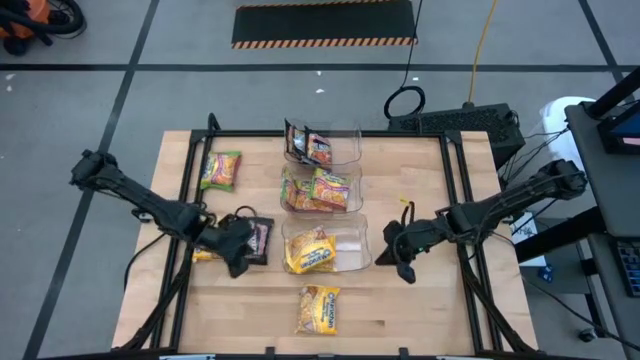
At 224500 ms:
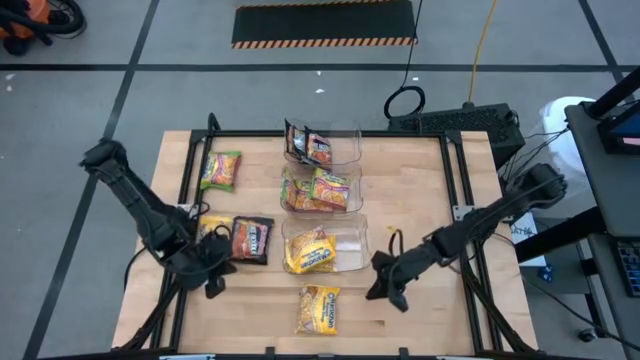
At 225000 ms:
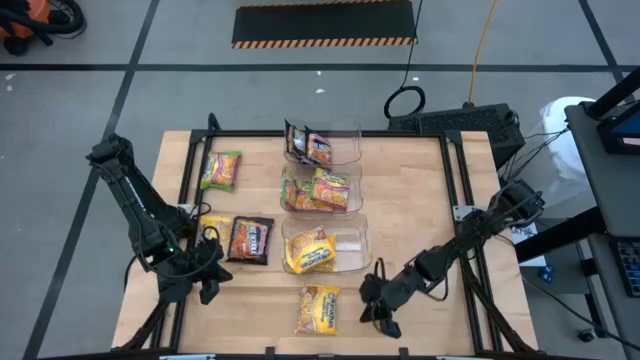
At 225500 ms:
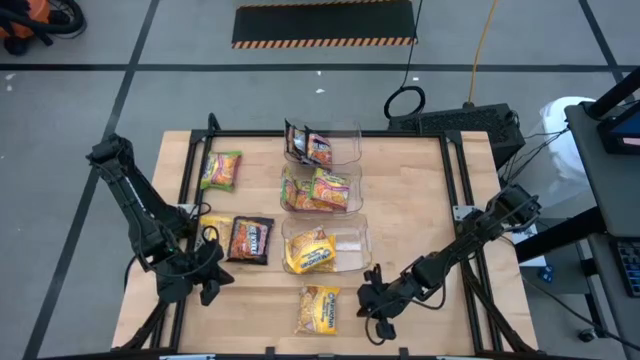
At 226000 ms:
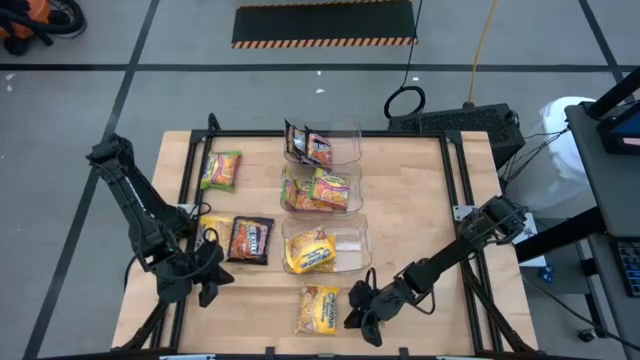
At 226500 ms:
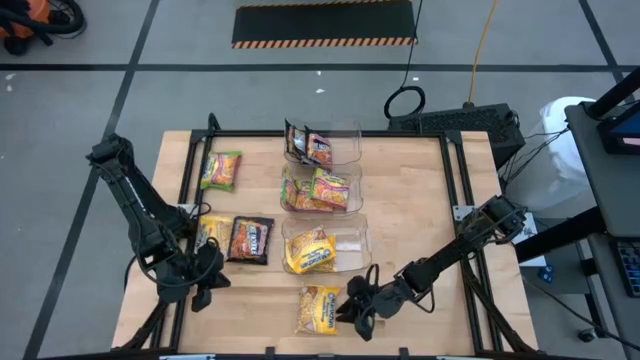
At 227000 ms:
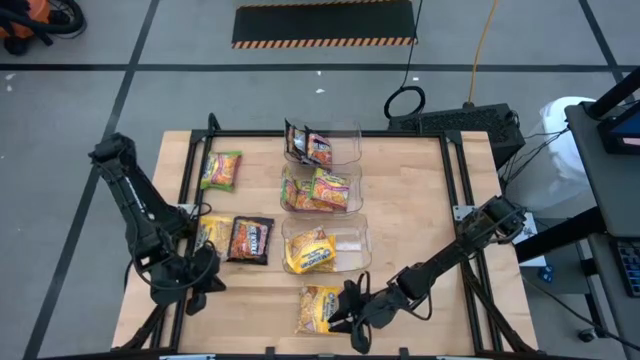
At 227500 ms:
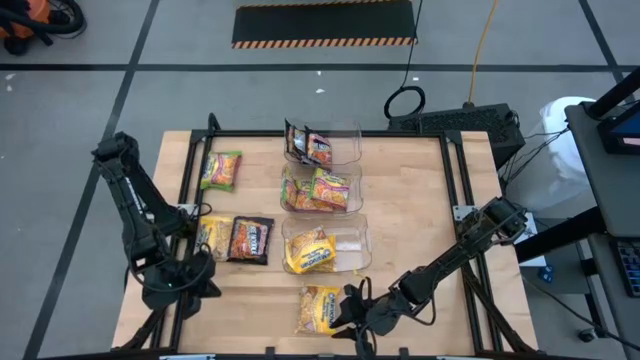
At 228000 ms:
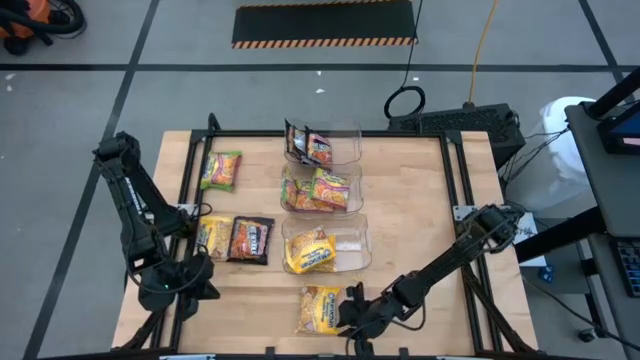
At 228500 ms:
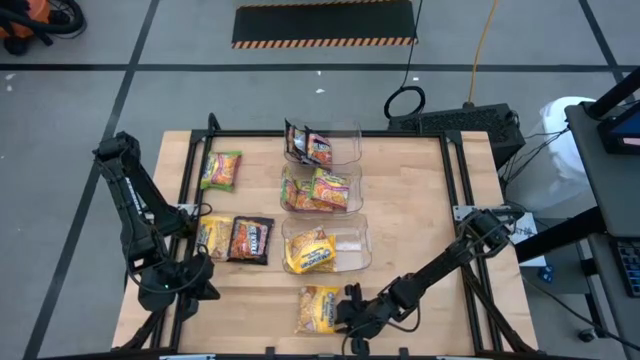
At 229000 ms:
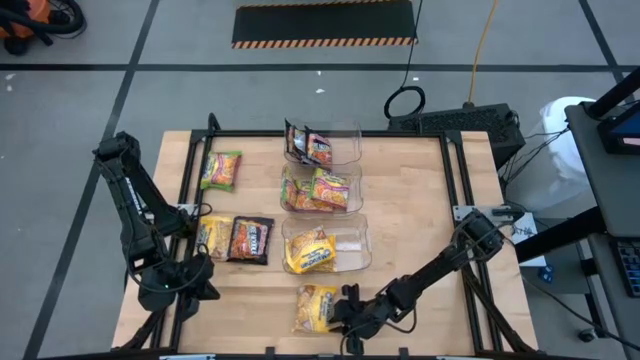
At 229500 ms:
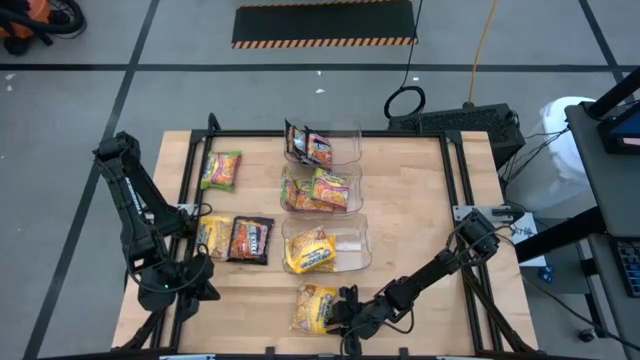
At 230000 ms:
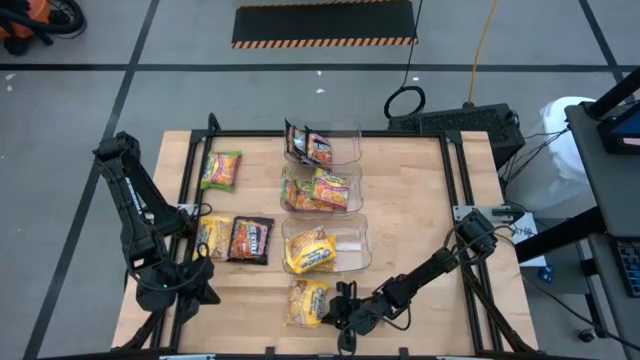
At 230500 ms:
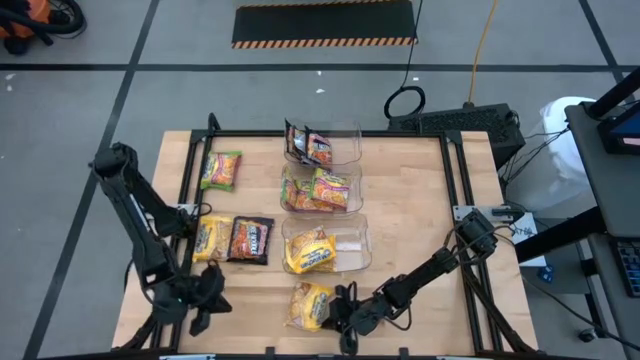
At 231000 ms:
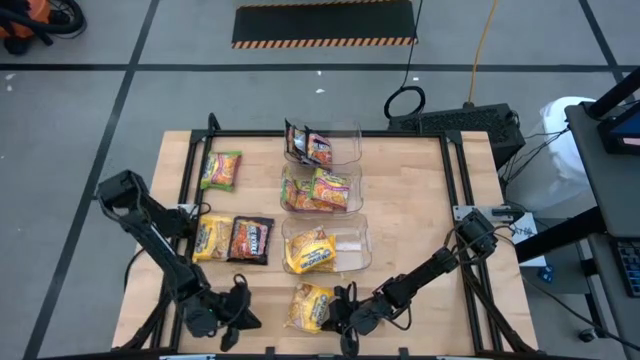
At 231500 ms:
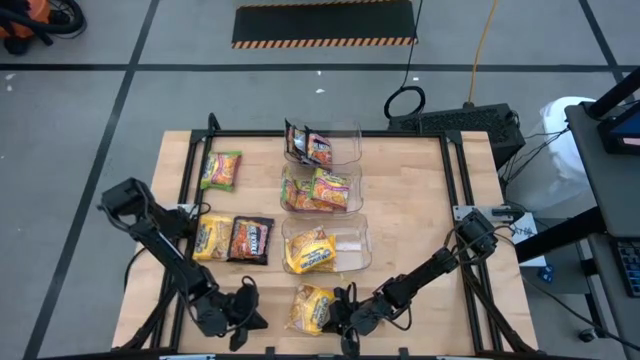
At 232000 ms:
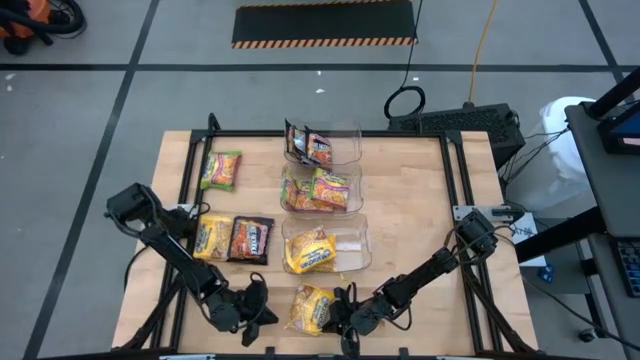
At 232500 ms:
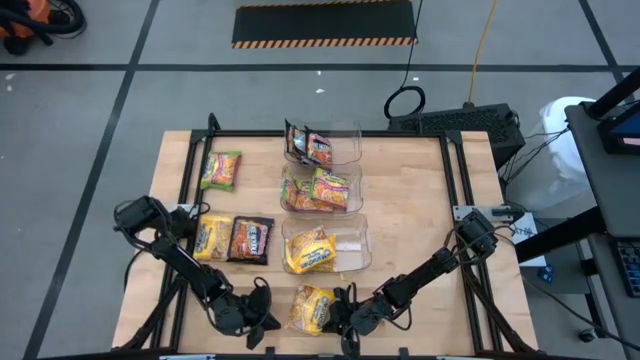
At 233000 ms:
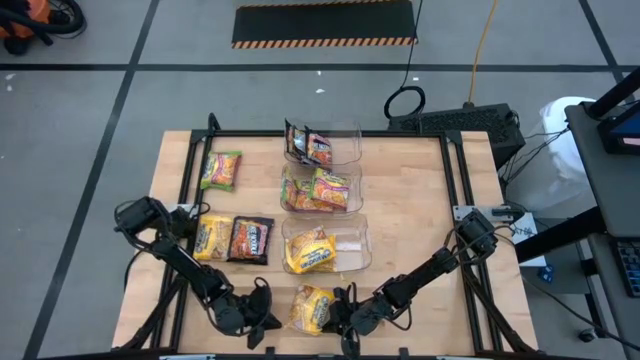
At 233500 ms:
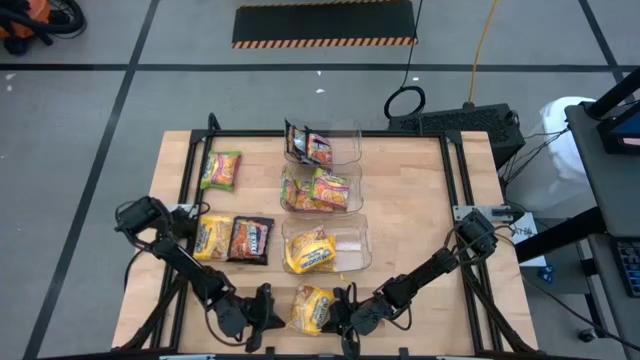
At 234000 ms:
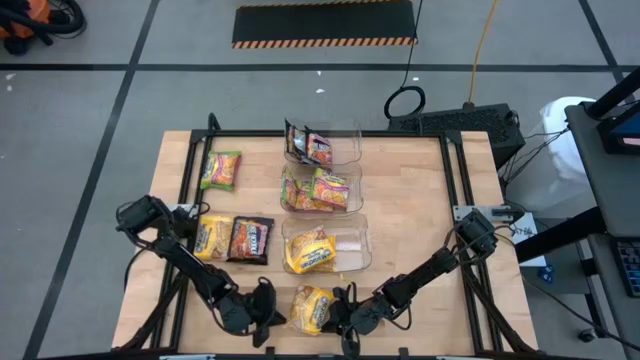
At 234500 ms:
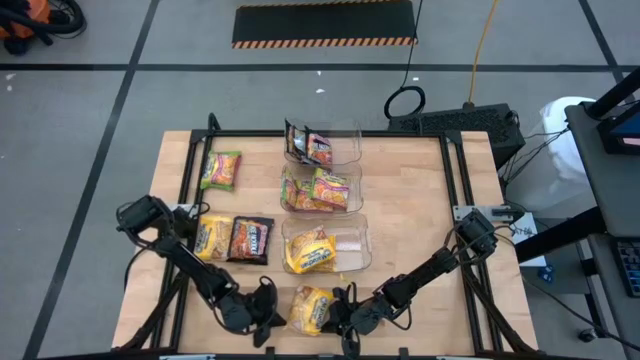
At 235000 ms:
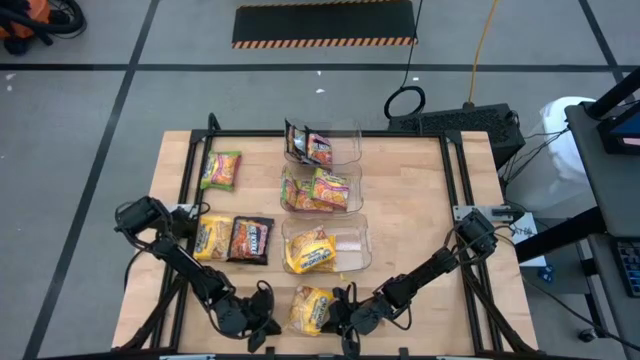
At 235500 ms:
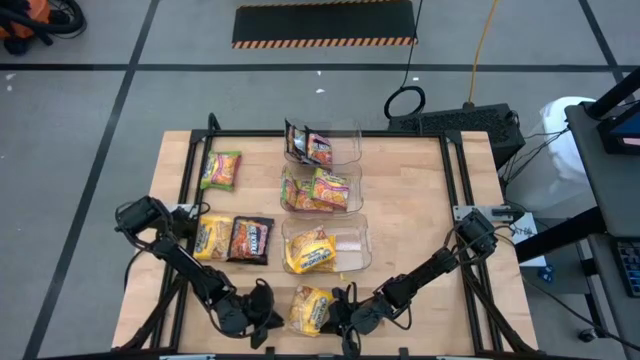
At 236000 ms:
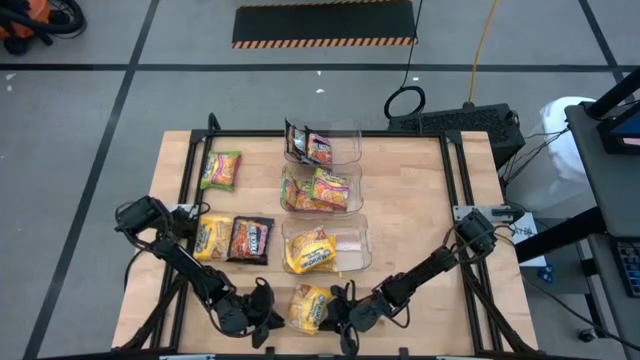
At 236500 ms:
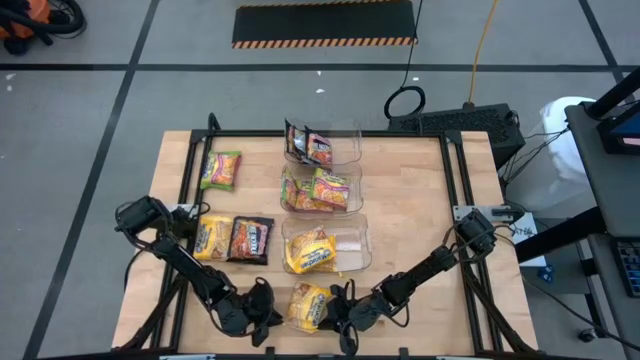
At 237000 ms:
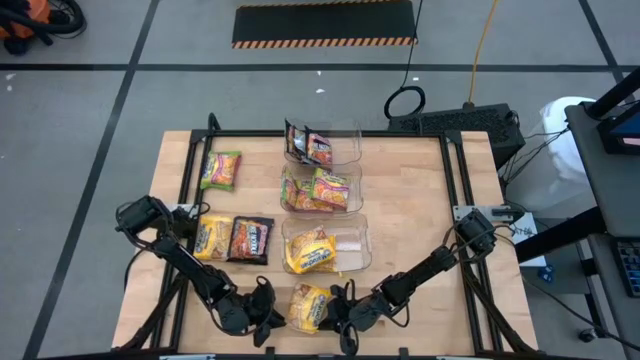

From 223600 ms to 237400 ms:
Task: Sort Maruchan noodles
Put the yellow noodle pack into the bottom transparent bin

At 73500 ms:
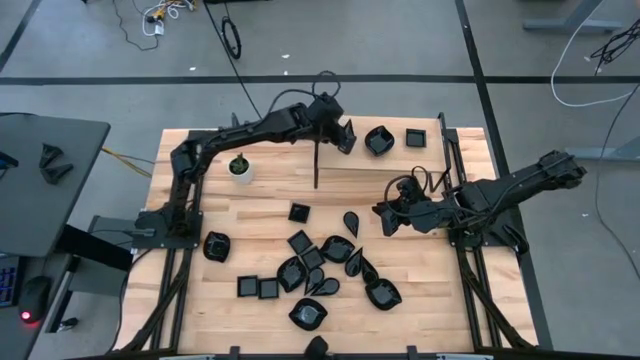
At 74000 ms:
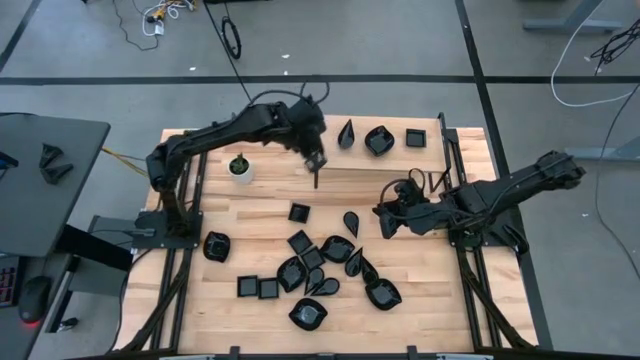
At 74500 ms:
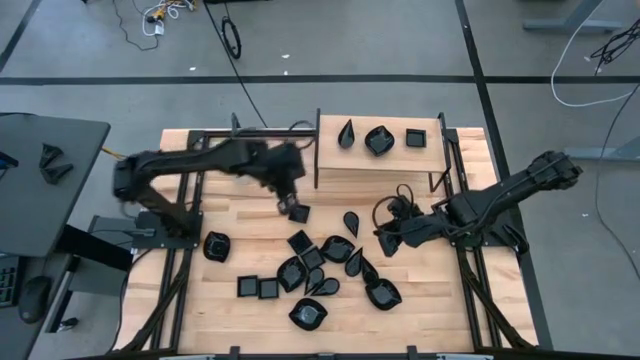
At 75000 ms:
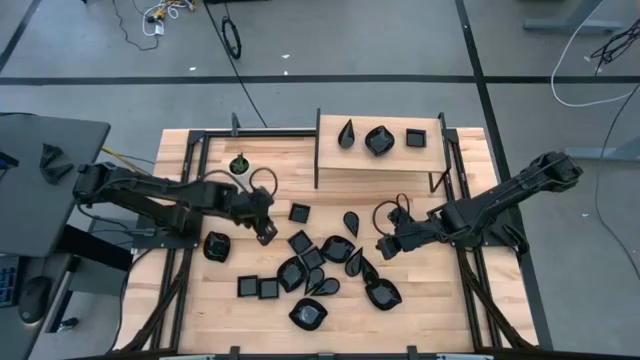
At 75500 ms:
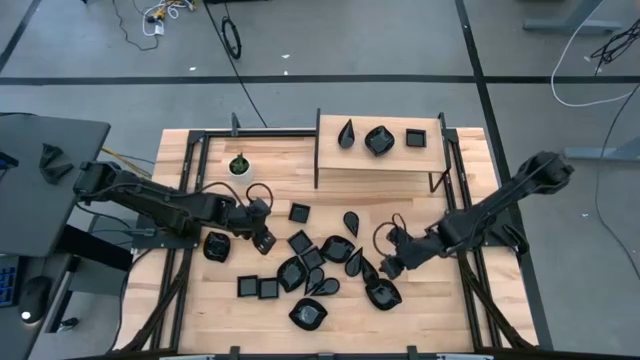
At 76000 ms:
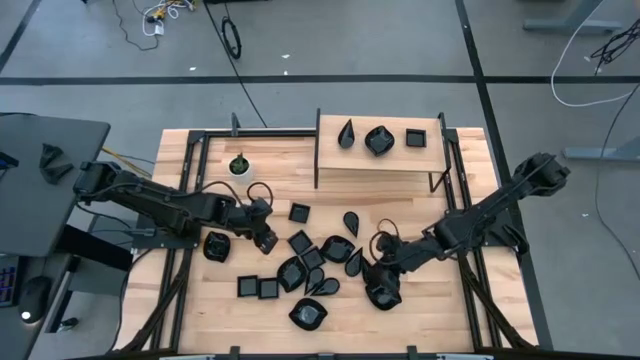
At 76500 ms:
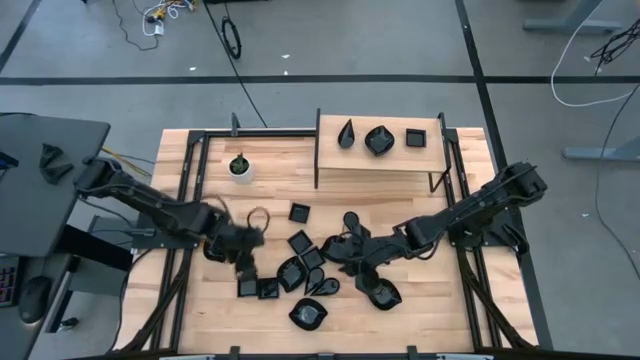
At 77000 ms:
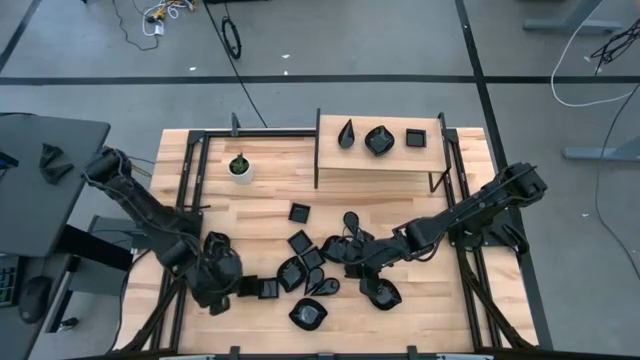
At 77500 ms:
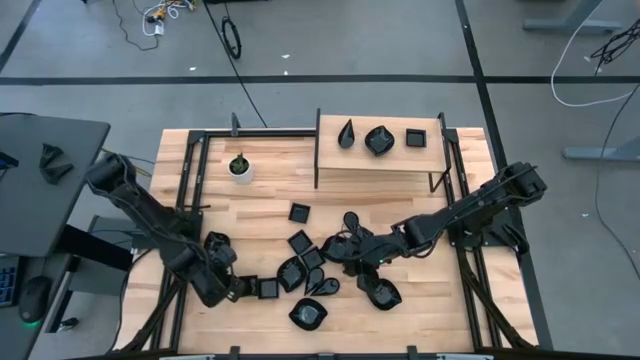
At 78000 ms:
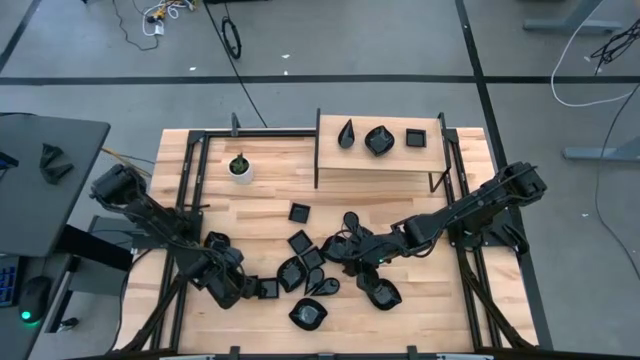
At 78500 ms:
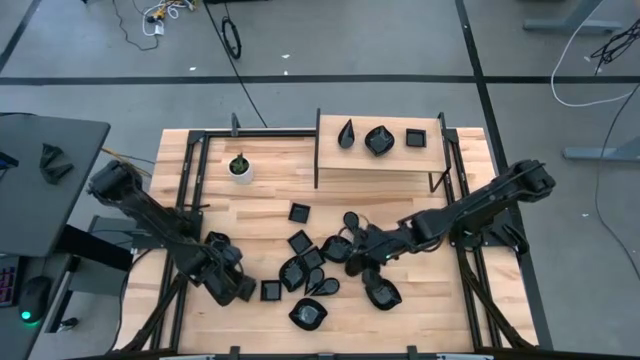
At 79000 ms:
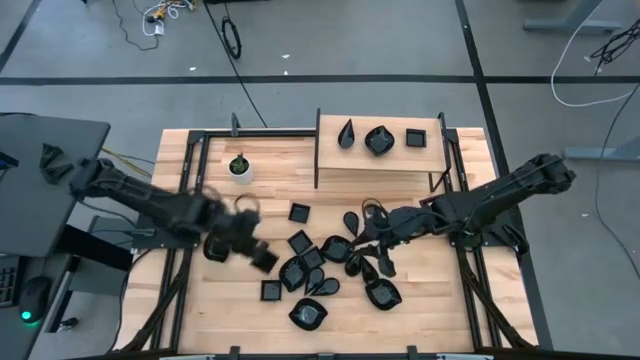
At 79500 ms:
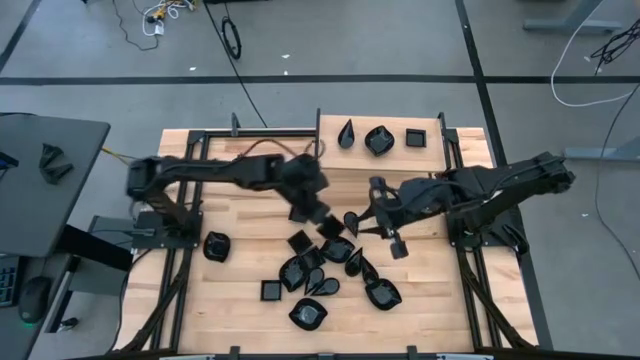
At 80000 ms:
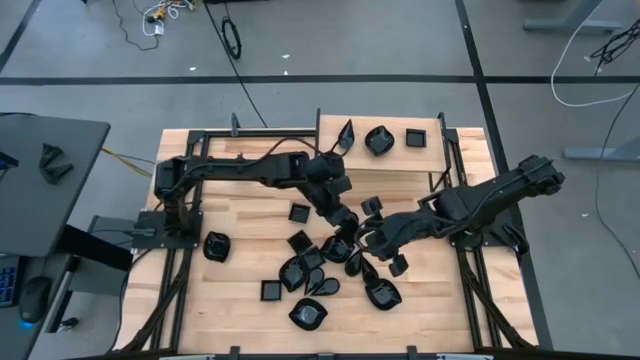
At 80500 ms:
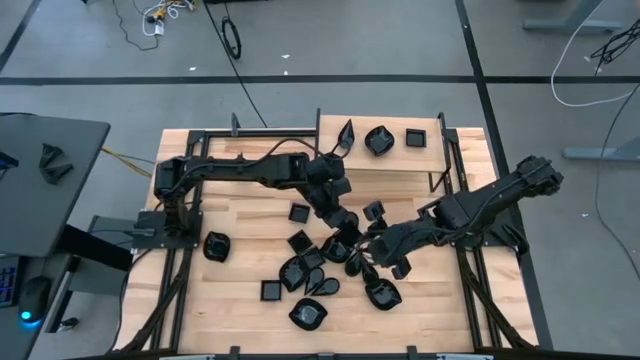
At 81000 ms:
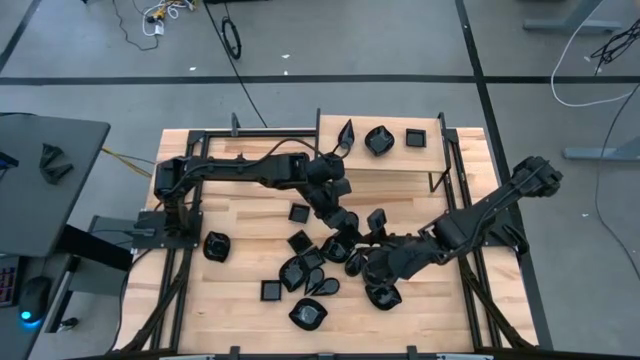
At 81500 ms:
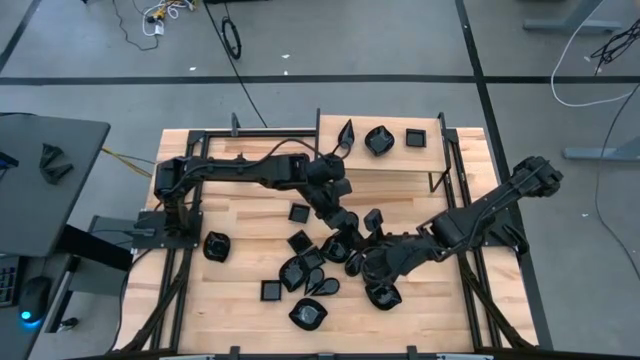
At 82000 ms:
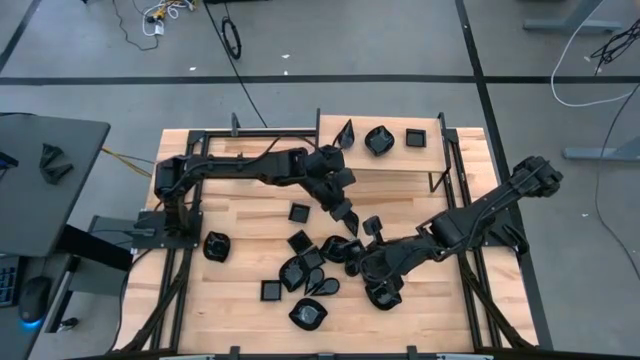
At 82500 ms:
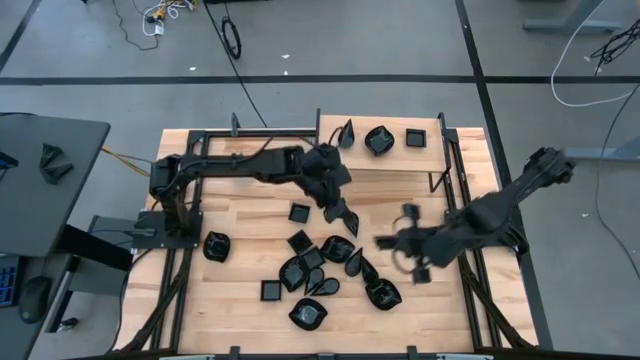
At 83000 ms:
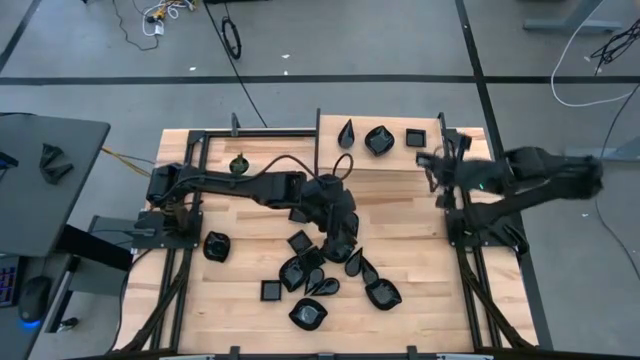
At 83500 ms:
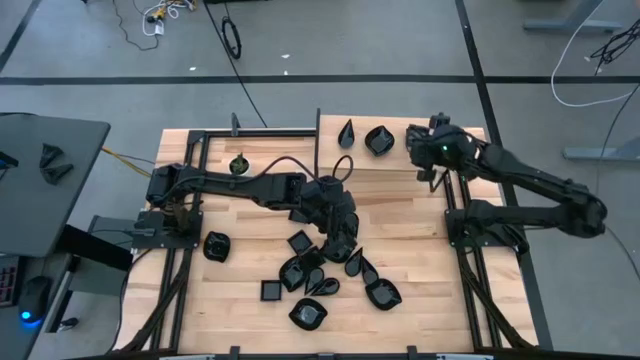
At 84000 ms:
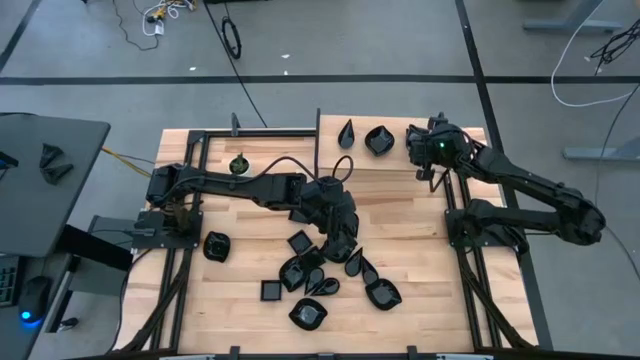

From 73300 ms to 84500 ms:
Task: Pick & Place Mini shaped plates
Stack the square plate on top of the square plate on the shelf
